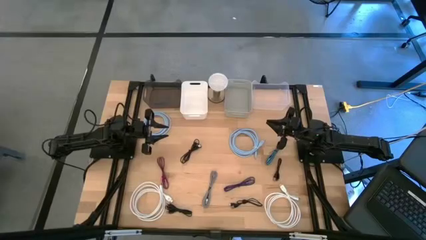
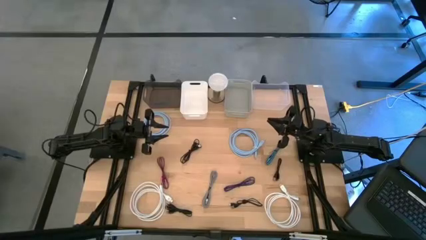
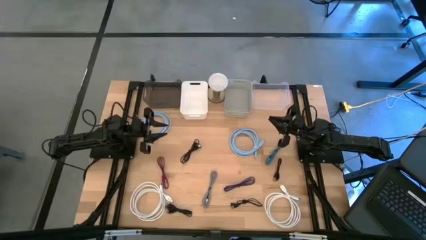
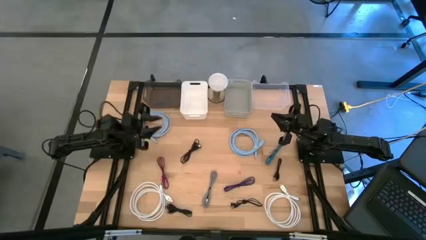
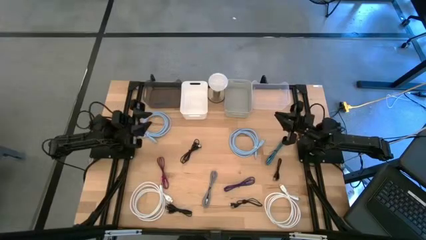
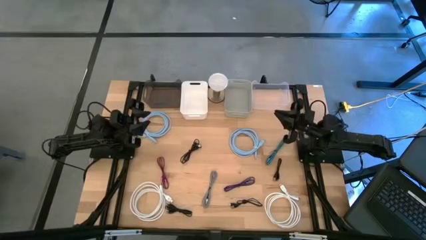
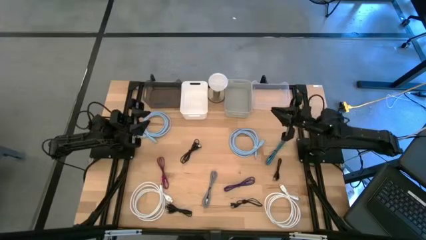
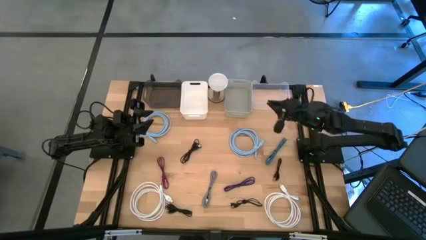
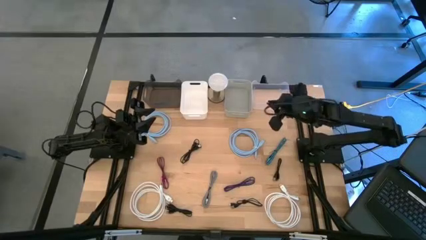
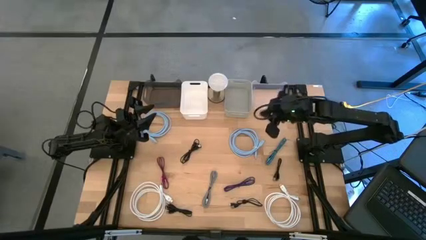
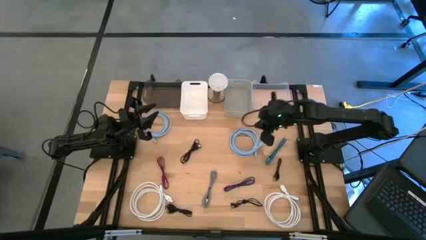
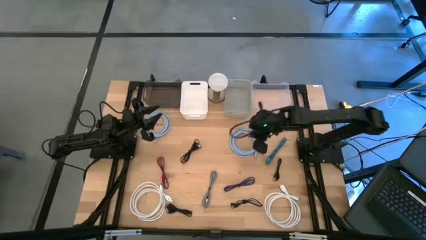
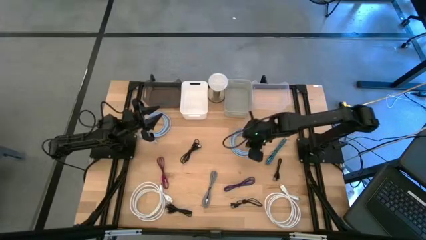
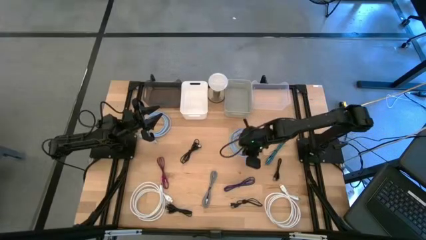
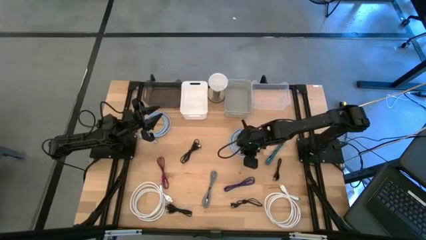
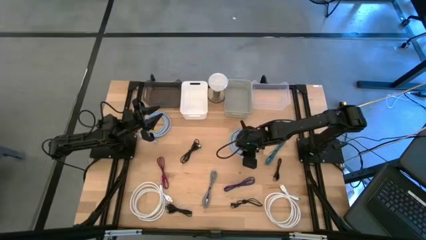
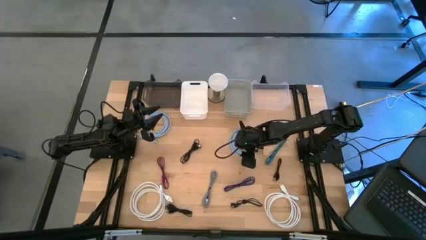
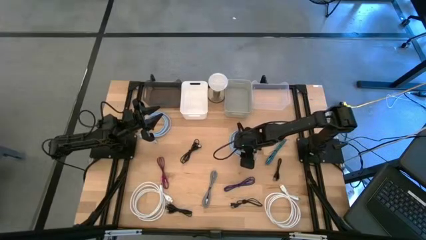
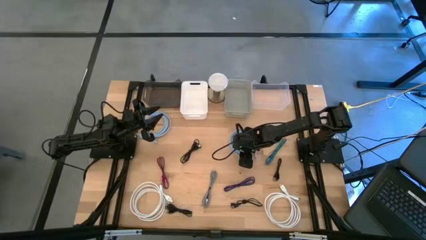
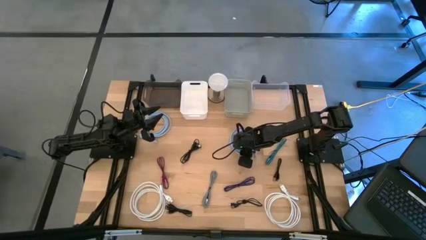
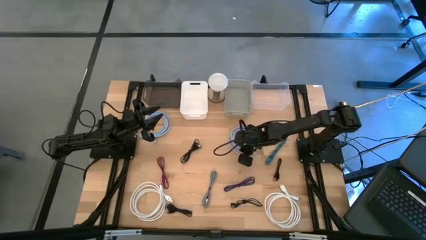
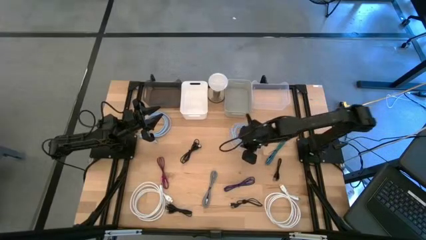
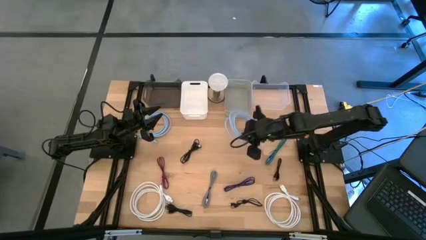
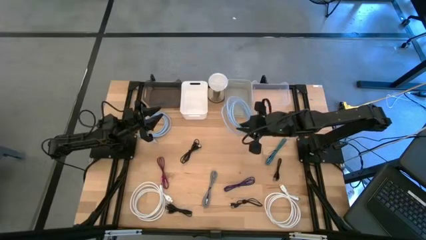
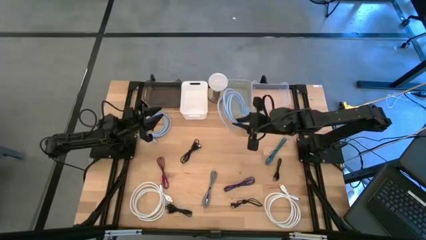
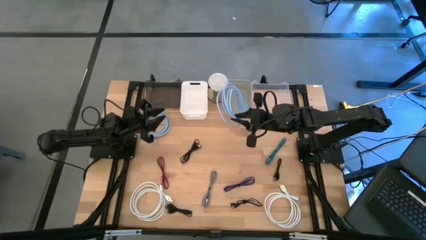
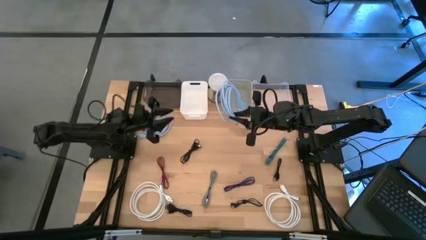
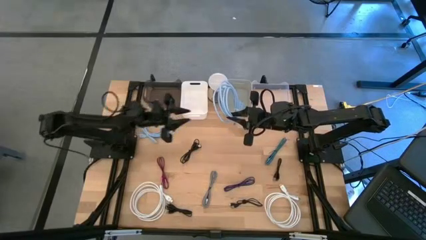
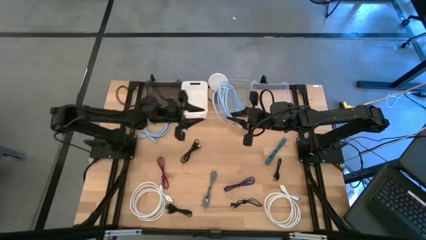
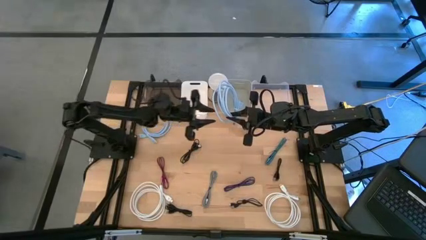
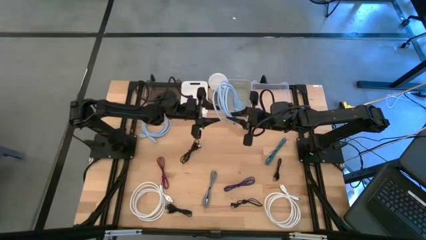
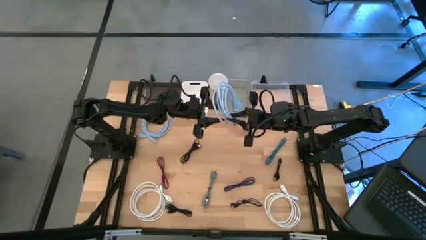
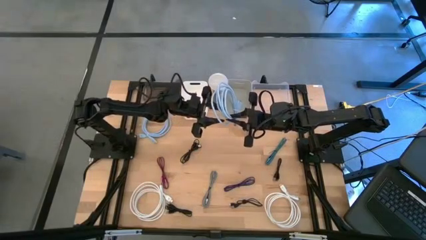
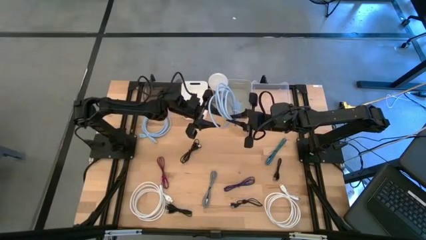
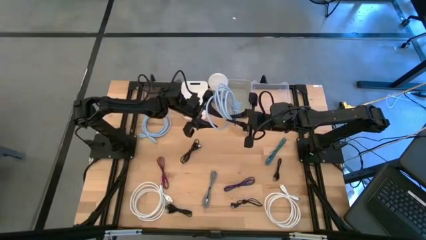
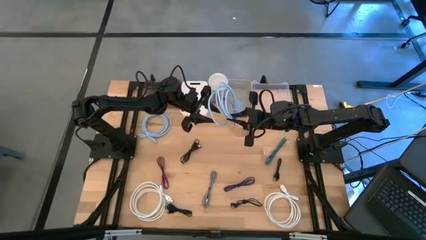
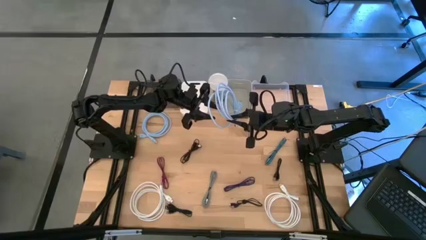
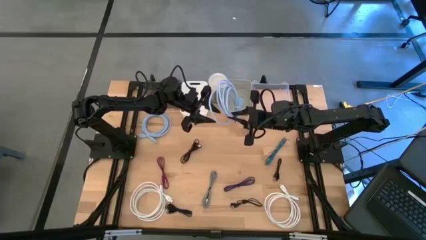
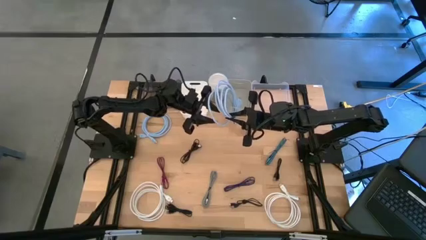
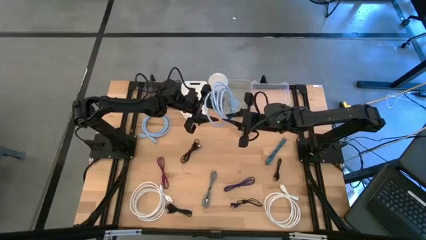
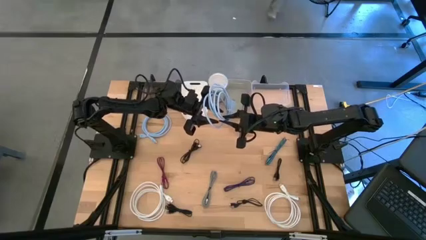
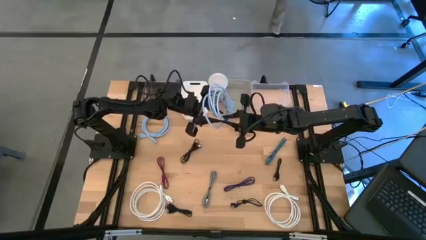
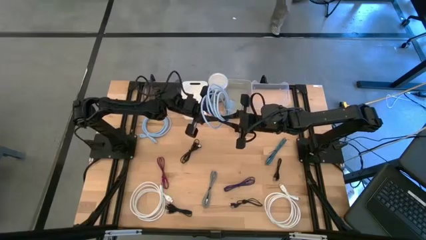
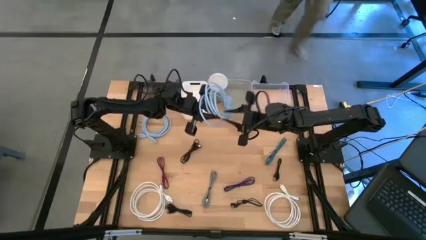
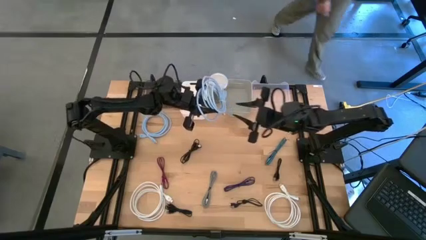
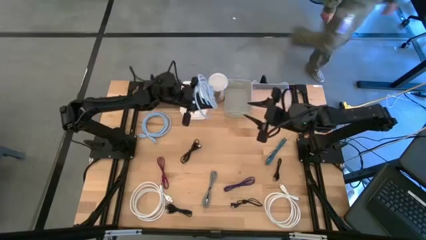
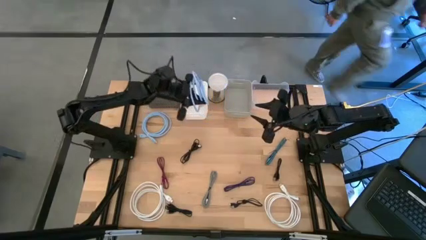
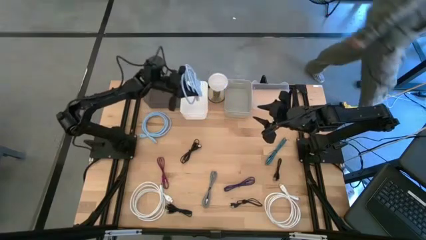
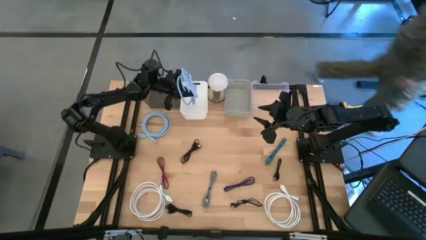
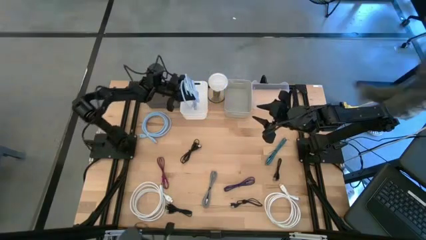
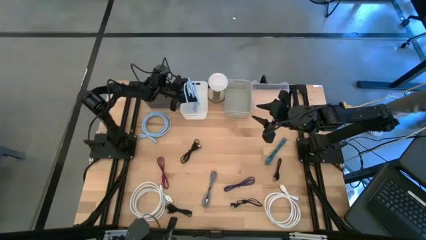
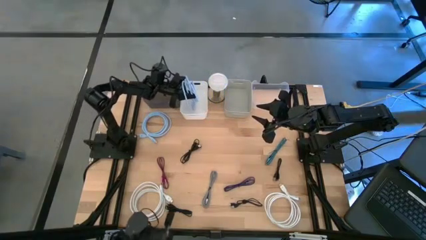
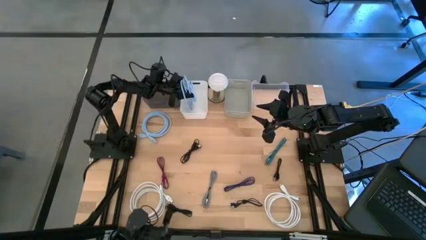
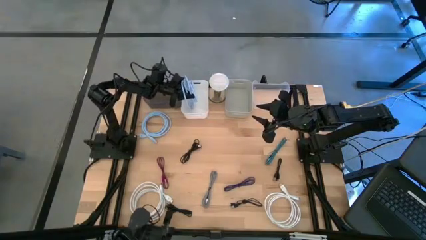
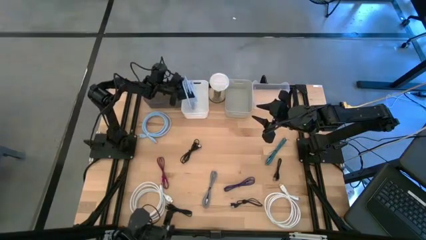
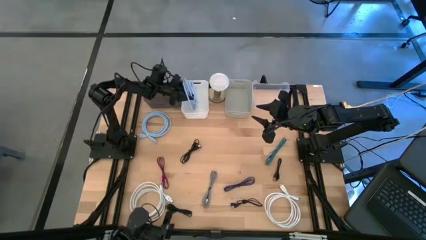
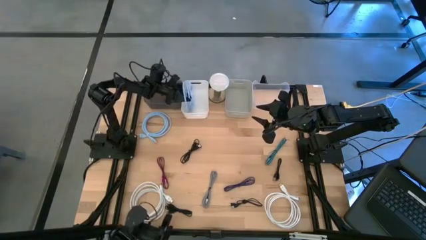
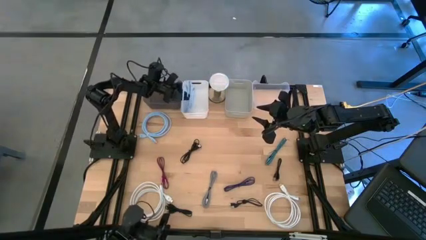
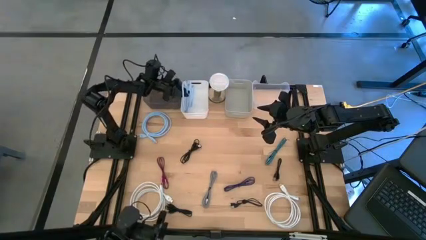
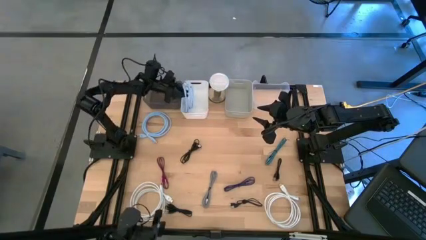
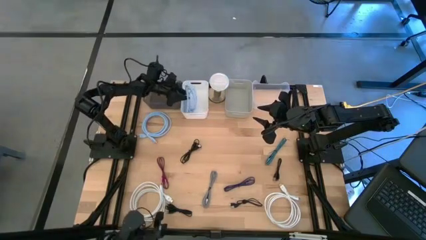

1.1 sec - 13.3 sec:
Task: Pick & Place USB Port
Put the blue HDMI cable into the white bin
